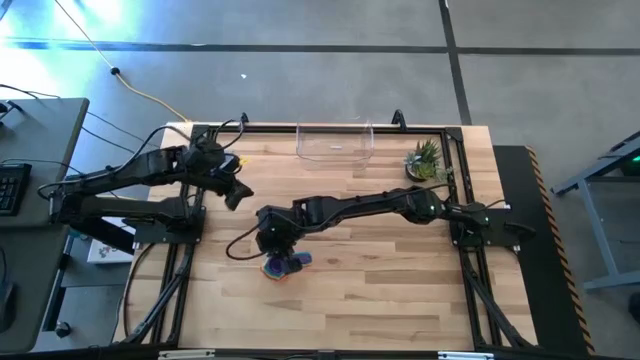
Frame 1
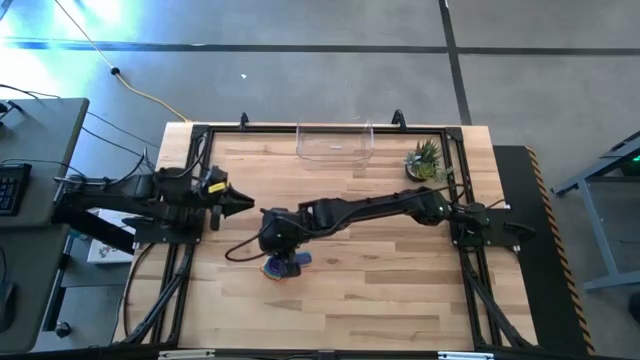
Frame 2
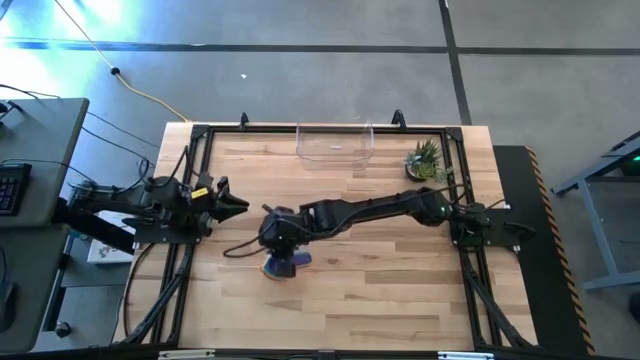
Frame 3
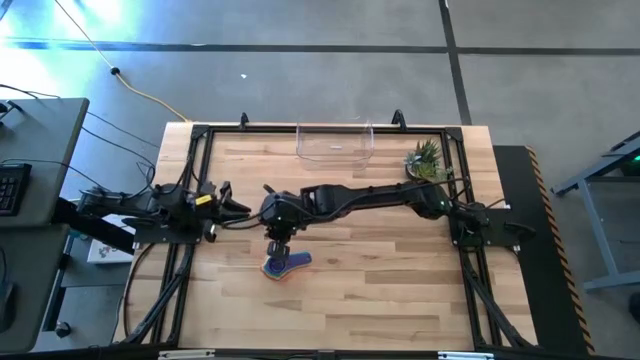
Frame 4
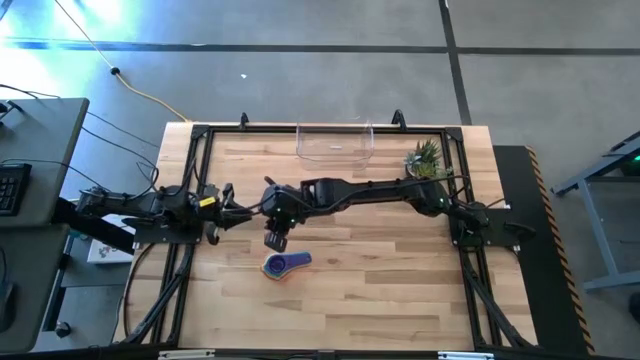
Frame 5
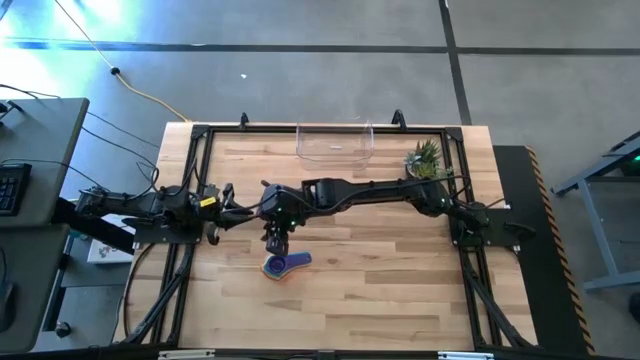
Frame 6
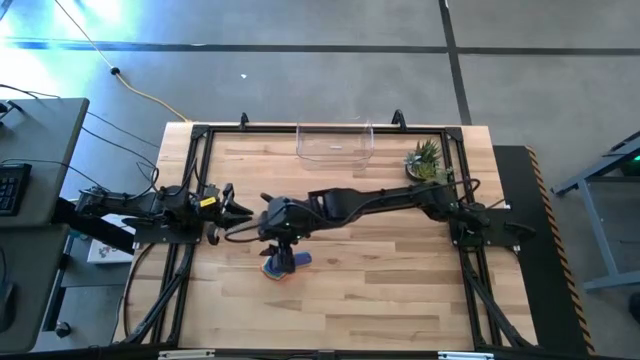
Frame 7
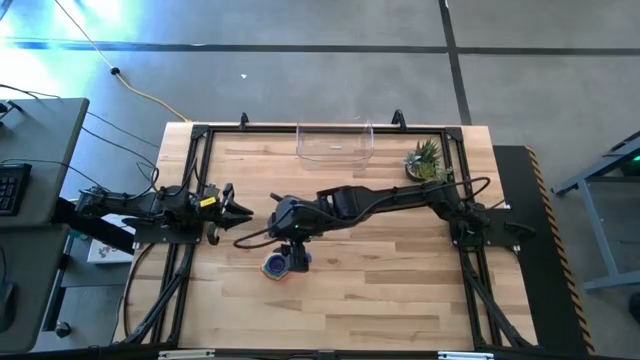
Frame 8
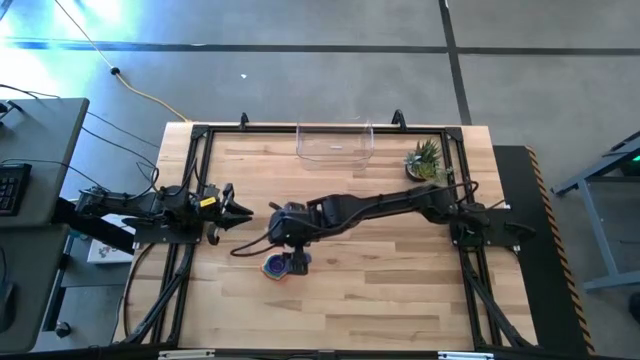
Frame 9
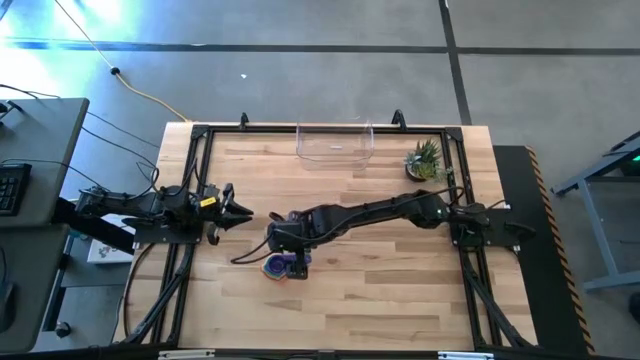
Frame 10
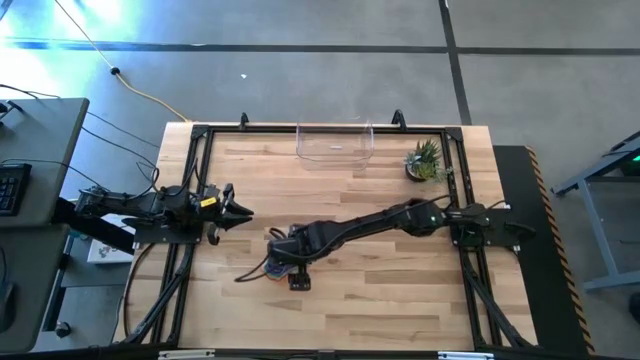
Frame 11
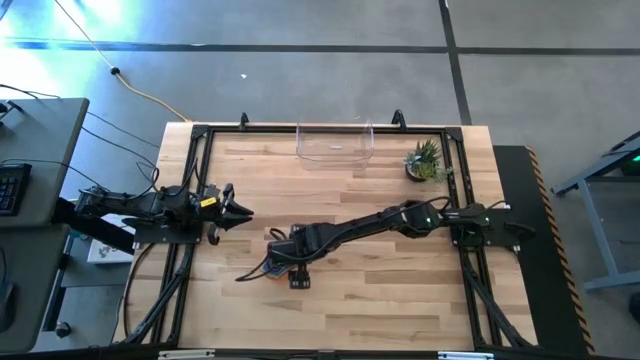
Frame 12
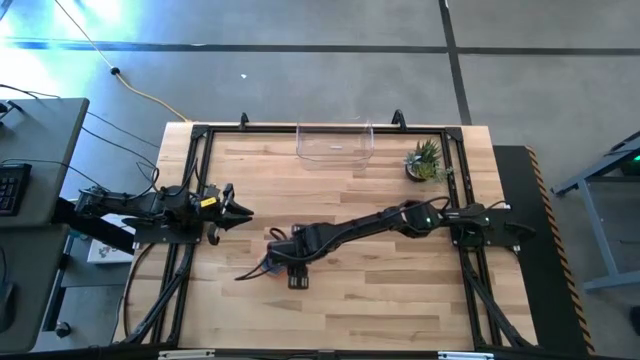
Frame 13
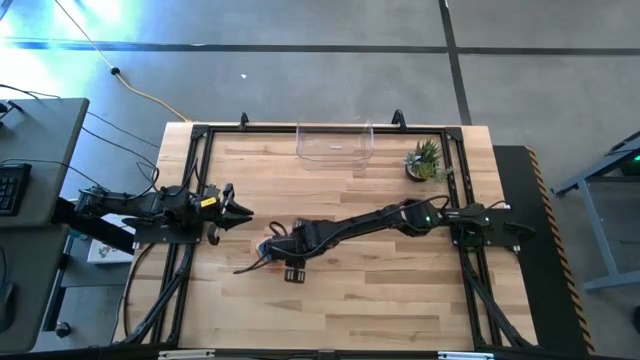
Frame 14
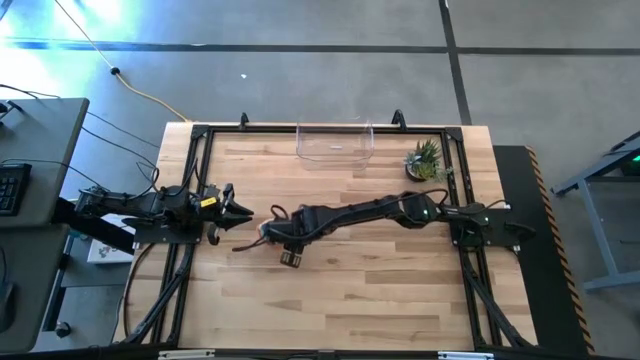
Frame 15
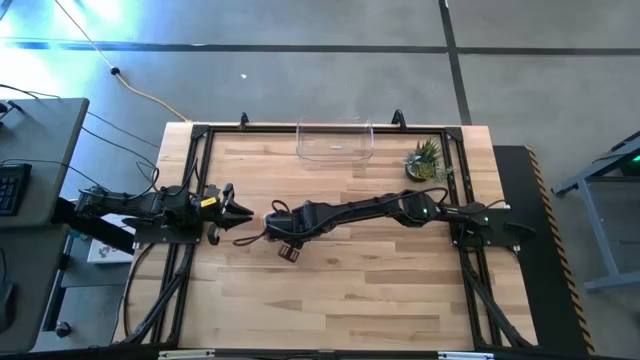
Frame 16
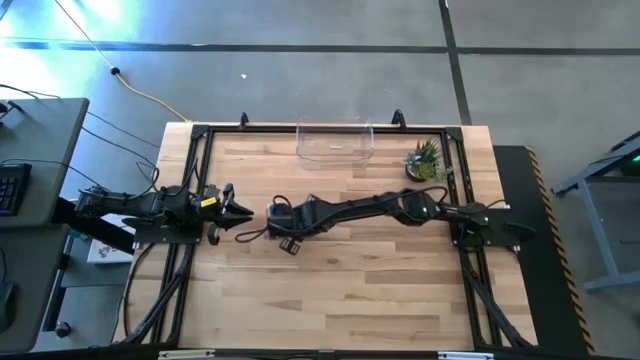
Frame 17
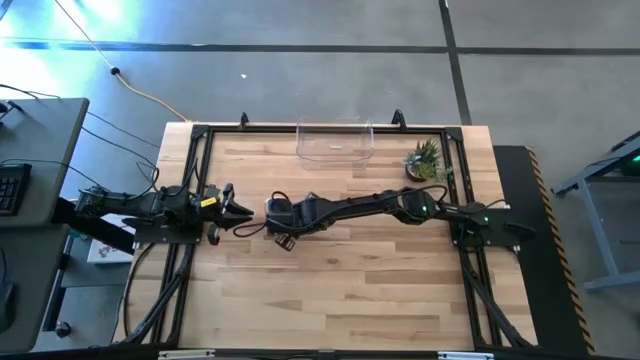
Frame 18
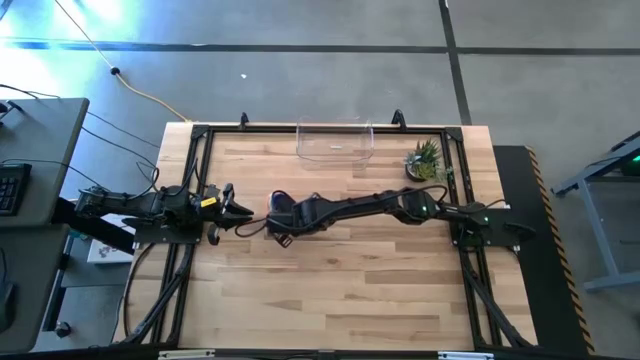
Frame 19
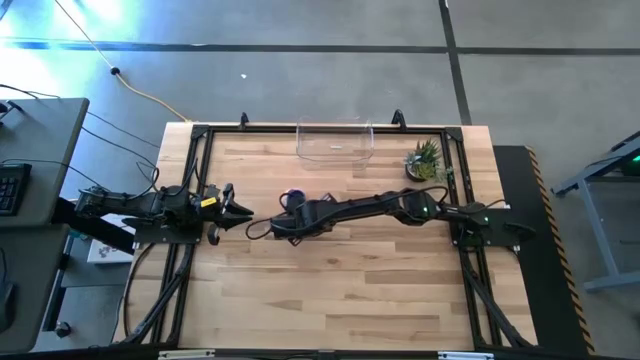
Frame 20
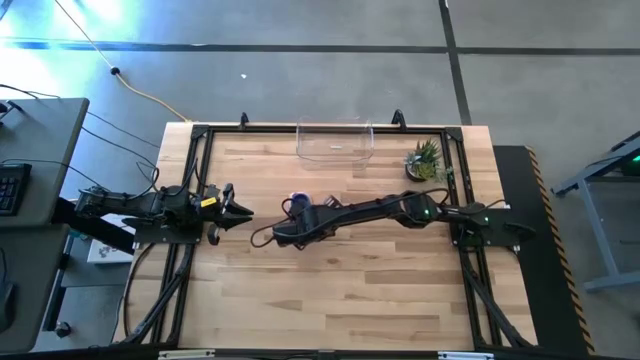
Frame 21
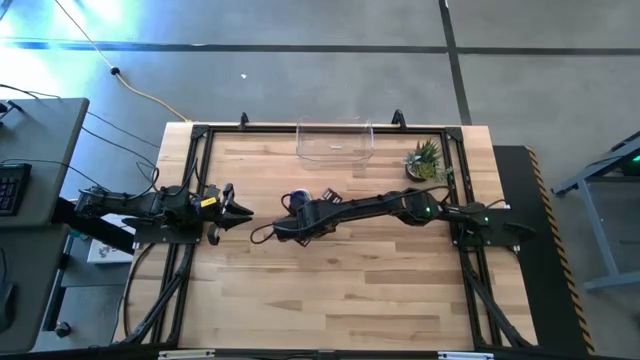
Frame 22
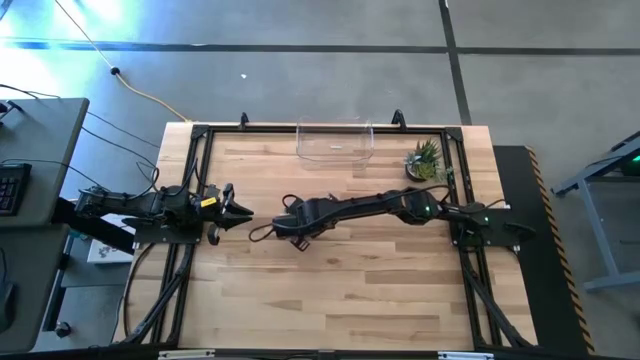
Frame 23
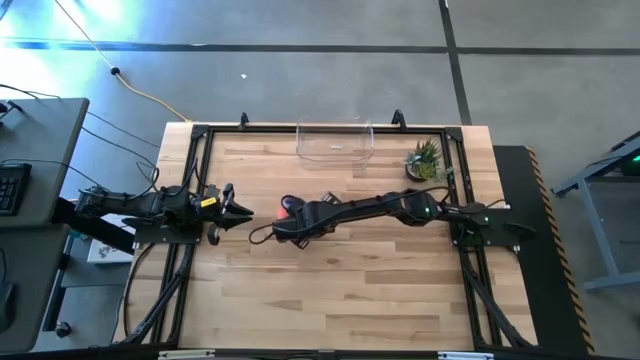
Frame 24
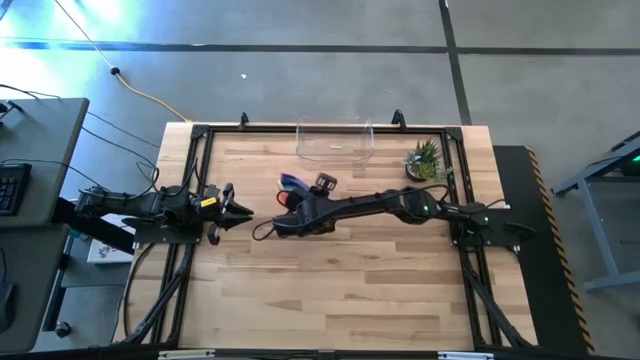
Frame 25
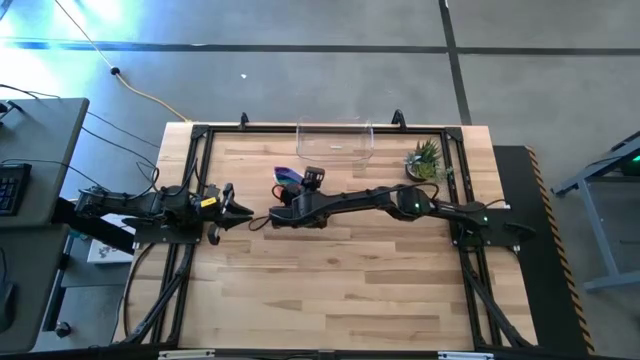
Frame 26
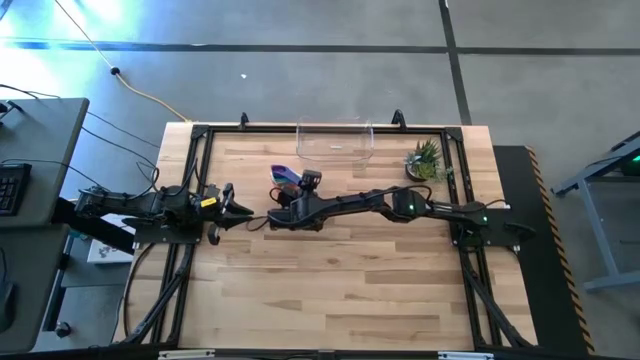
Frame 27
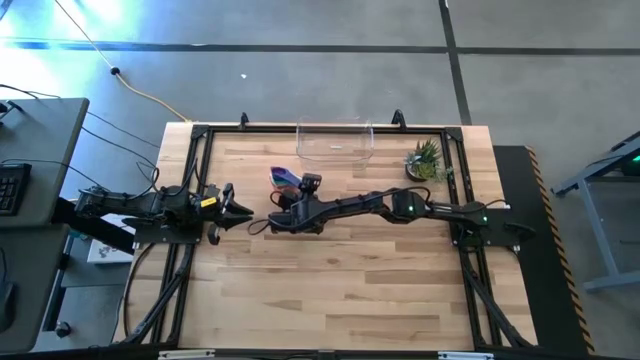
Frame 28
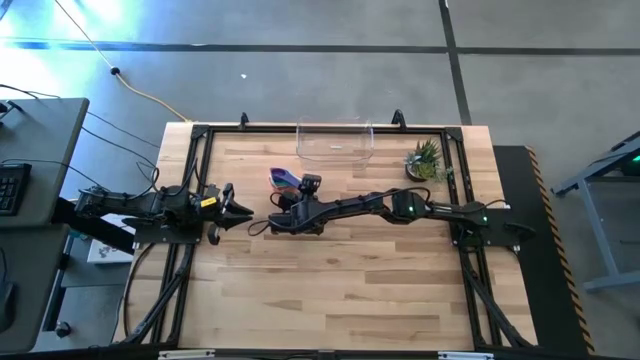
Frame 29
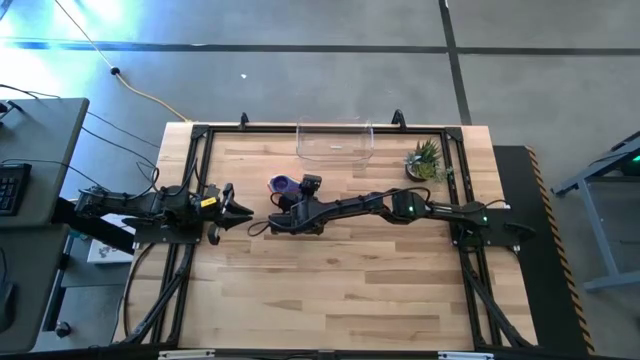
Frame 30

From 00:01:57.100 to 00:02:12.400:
Task: Nest measuring cups in basket
Put the nest of measuring cups into the transparent bin

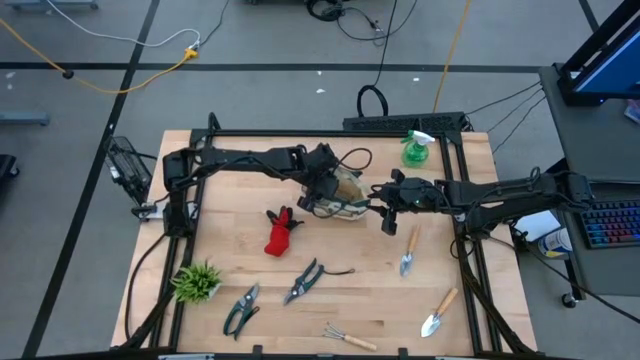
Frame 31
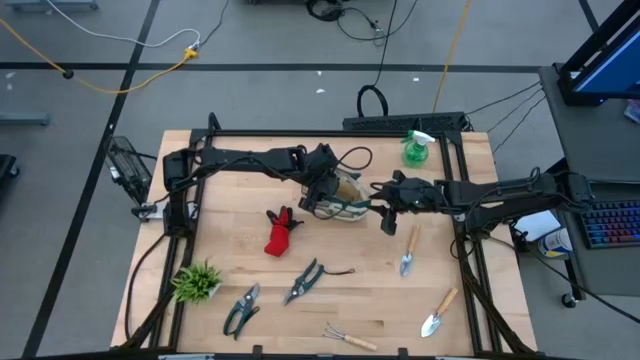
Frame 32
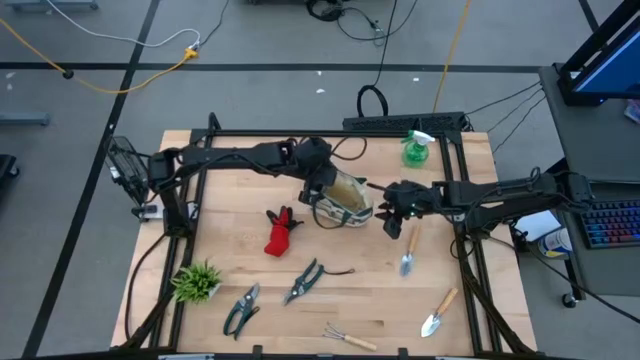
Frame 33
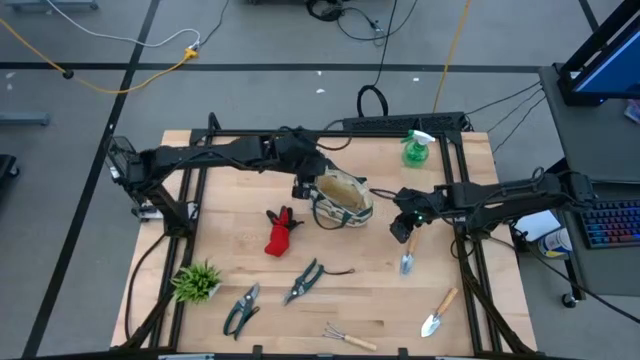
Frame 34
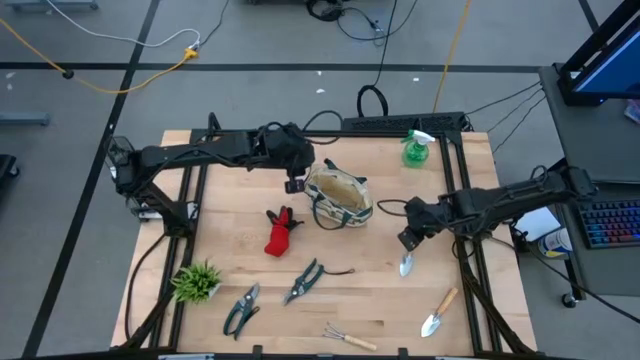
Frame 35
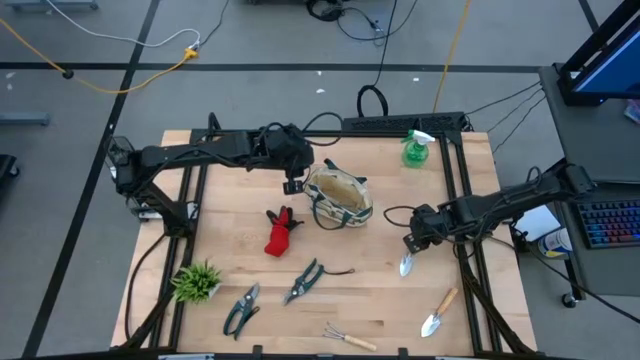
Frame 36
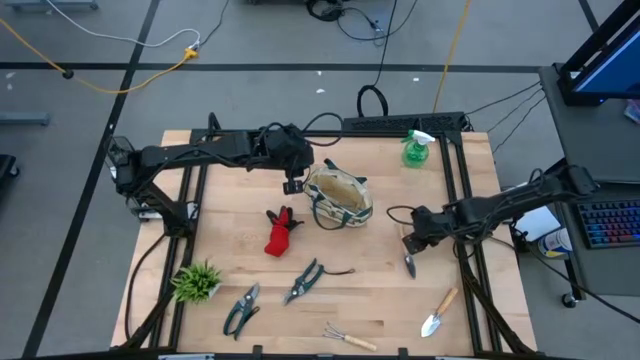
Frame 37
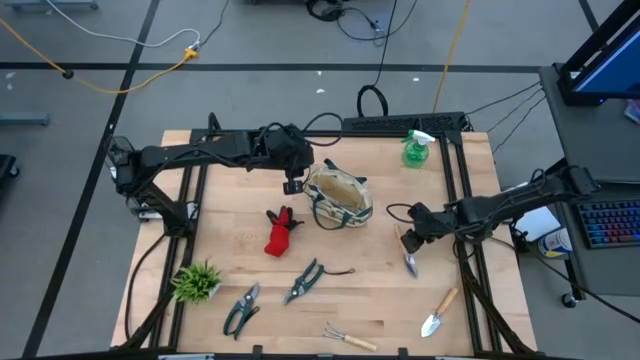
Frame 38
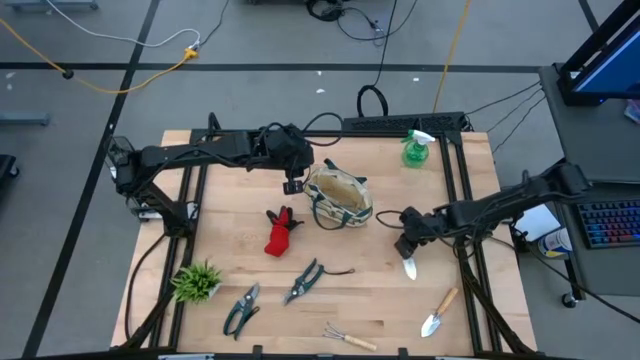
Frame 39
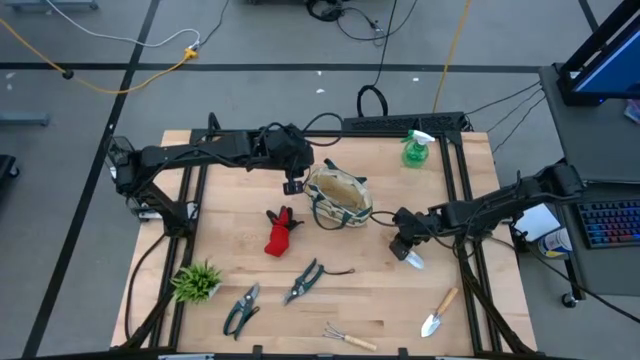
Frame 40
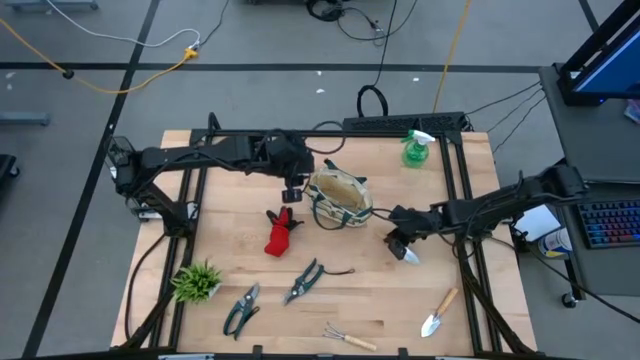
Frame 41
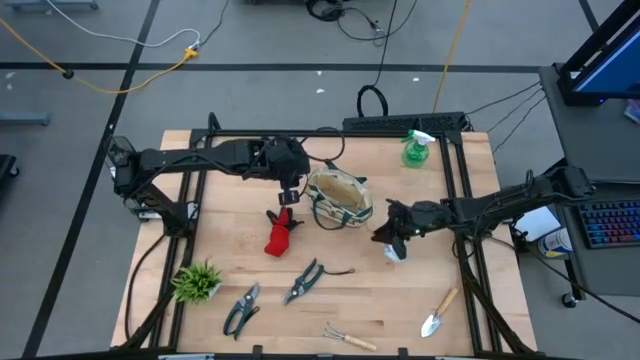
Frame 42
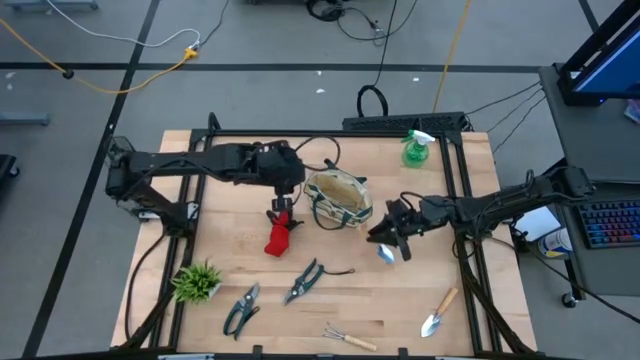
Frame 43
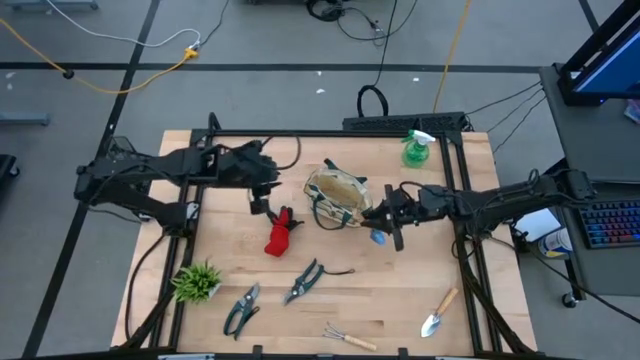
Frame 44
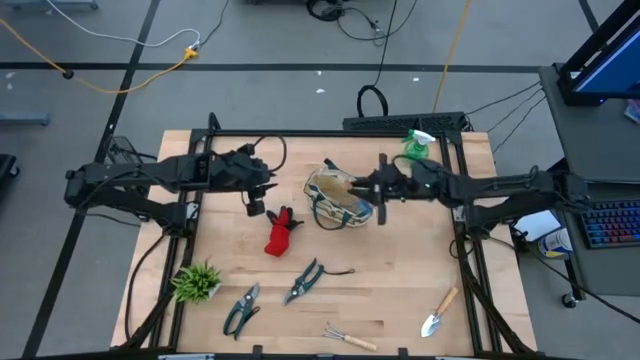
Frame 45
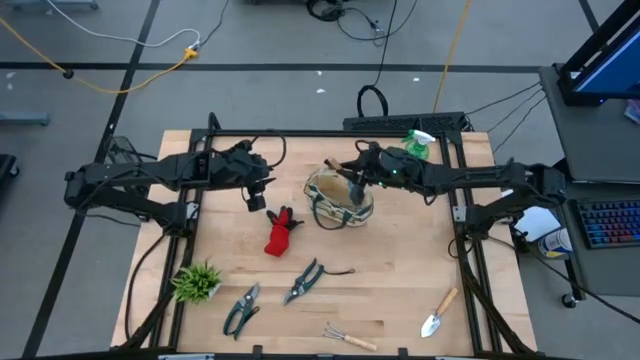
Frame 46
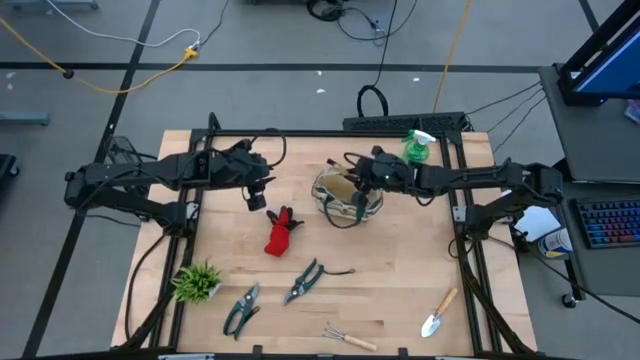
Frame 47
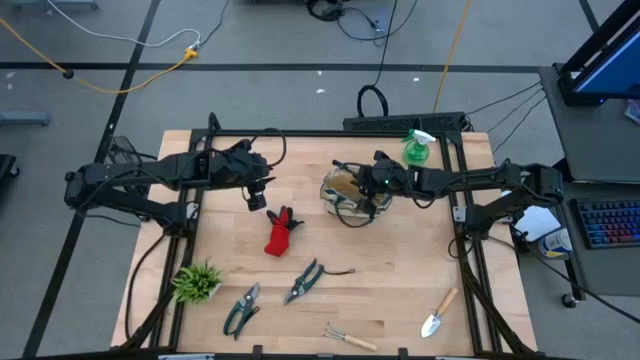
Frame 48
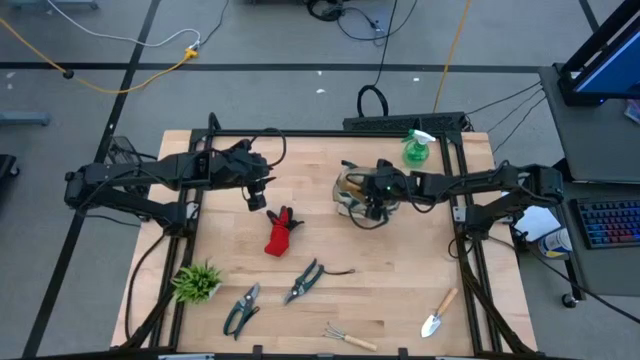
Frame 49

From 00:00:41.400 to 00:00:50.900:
Task: Pick & Place Garden tools in Gardening bag
Put the top brown trowel into the gardening bag
